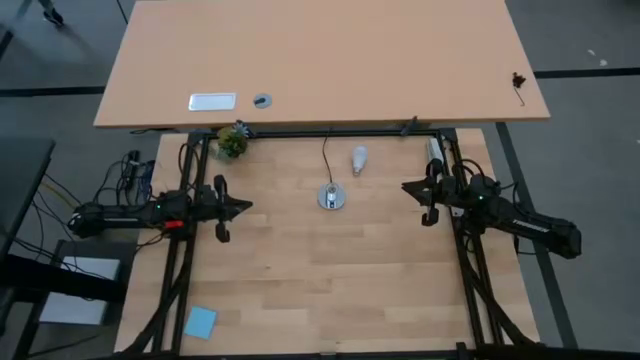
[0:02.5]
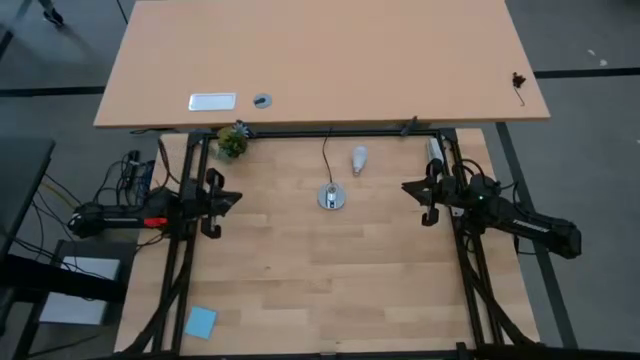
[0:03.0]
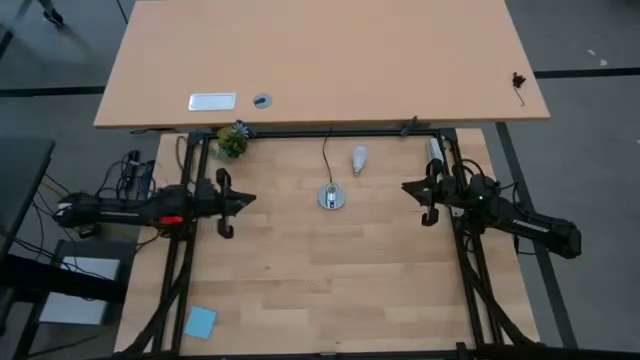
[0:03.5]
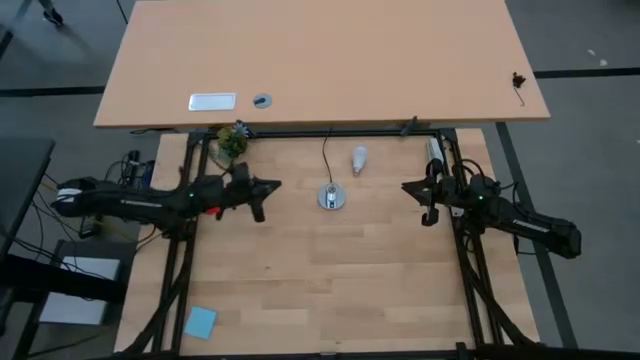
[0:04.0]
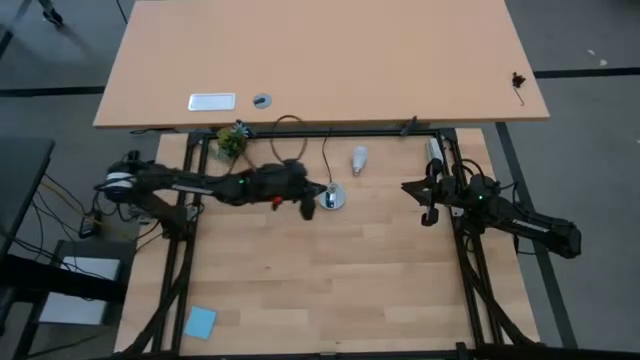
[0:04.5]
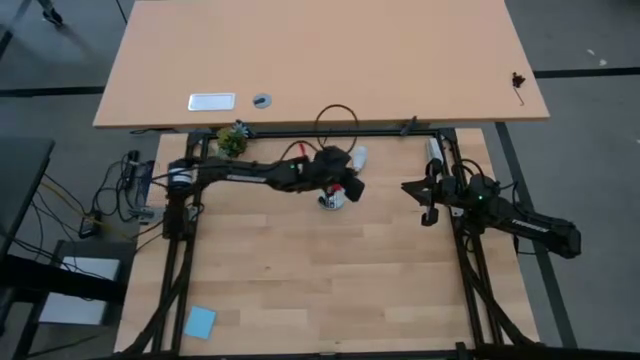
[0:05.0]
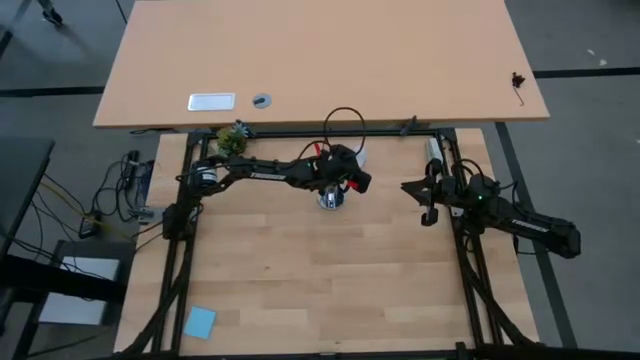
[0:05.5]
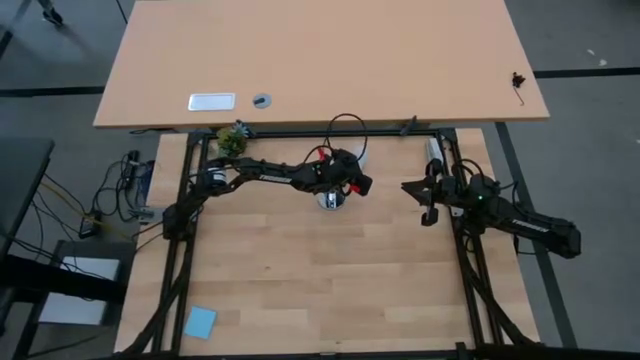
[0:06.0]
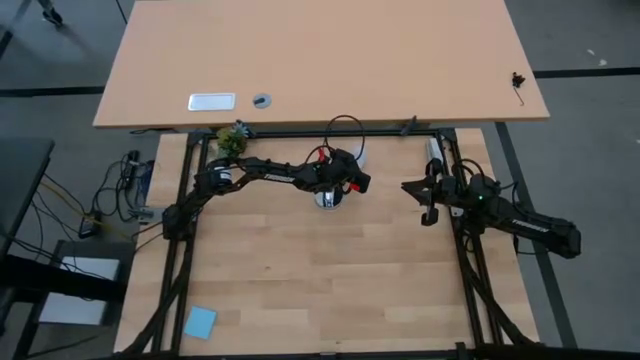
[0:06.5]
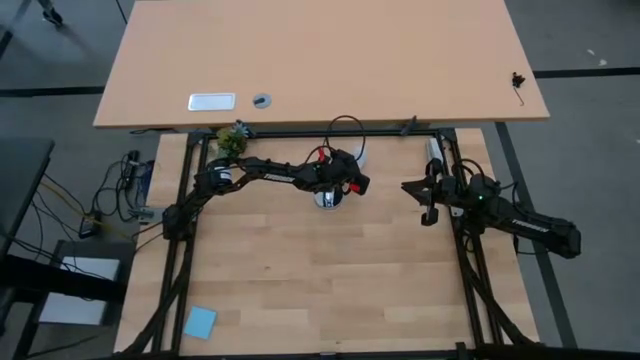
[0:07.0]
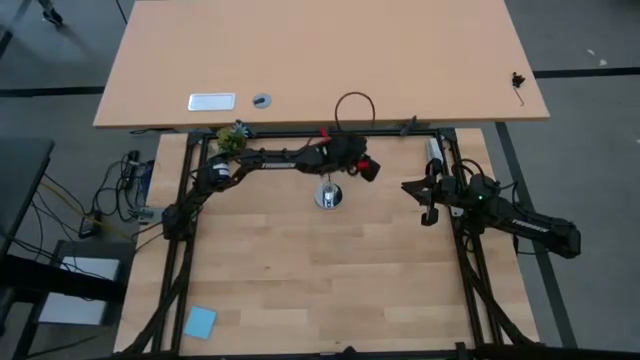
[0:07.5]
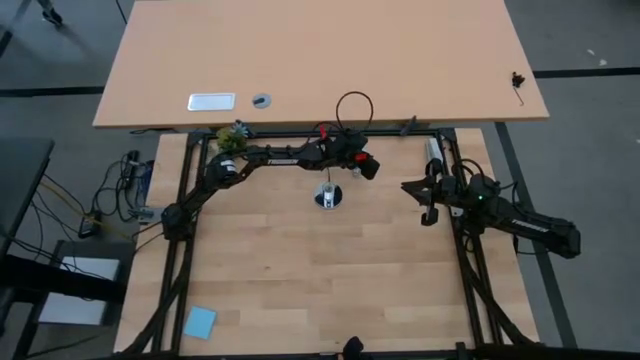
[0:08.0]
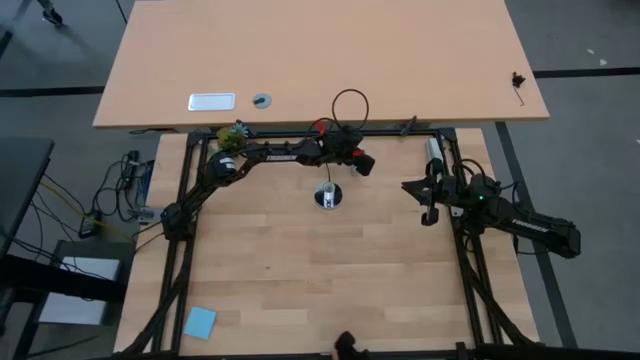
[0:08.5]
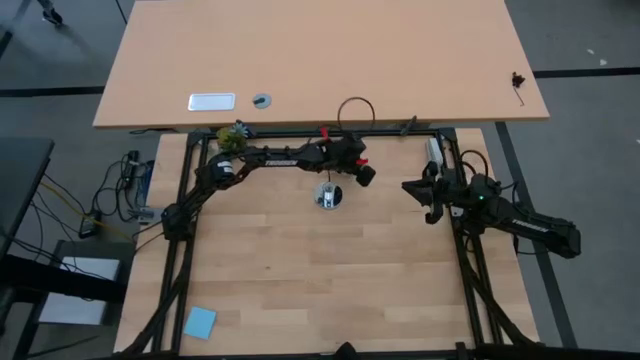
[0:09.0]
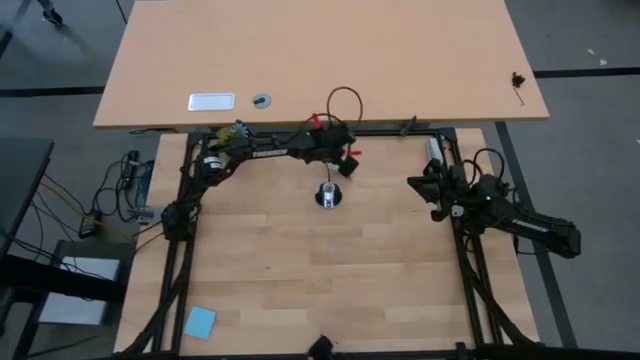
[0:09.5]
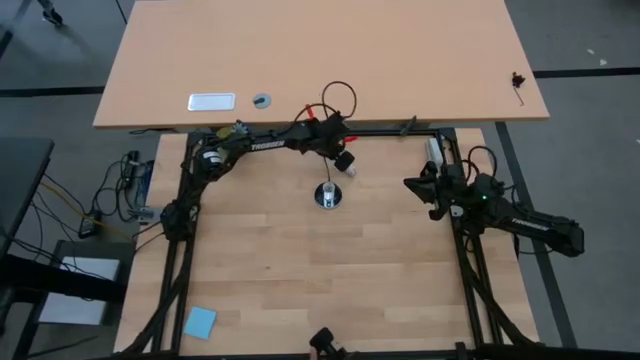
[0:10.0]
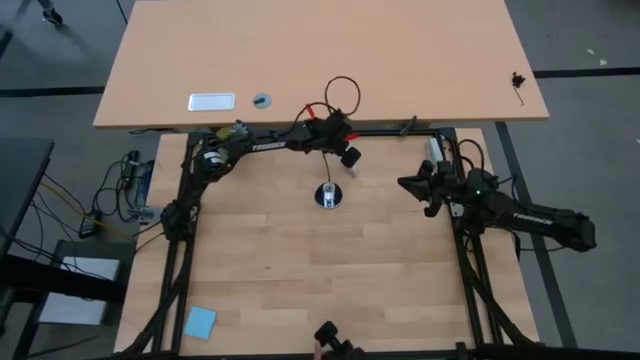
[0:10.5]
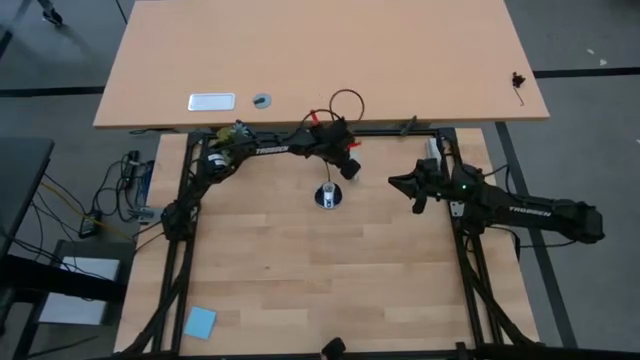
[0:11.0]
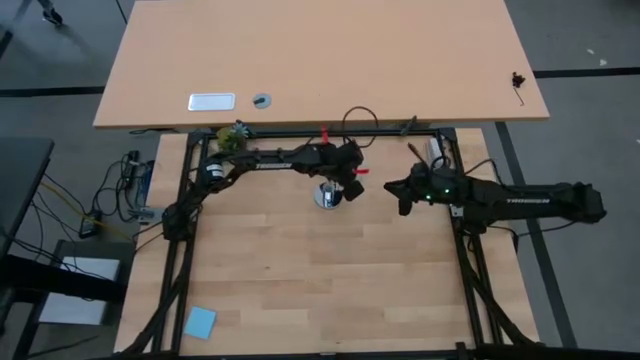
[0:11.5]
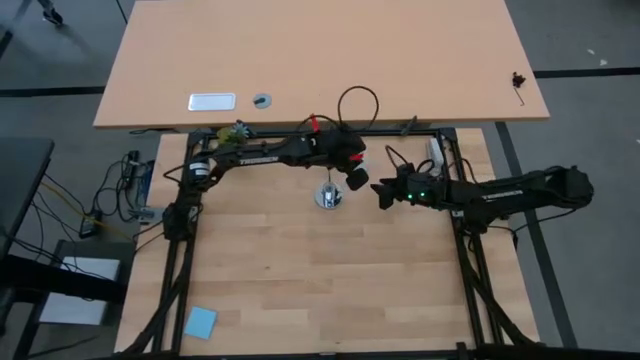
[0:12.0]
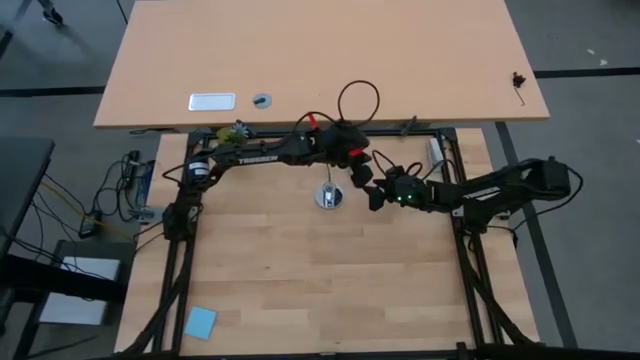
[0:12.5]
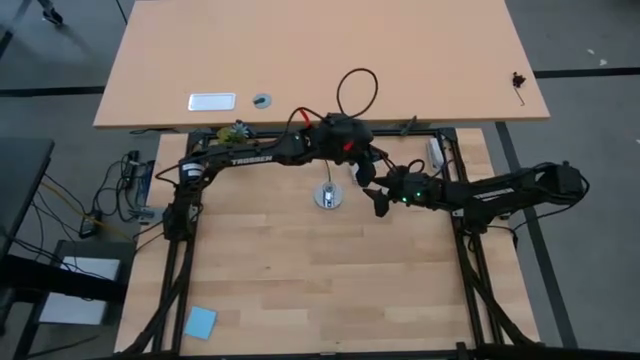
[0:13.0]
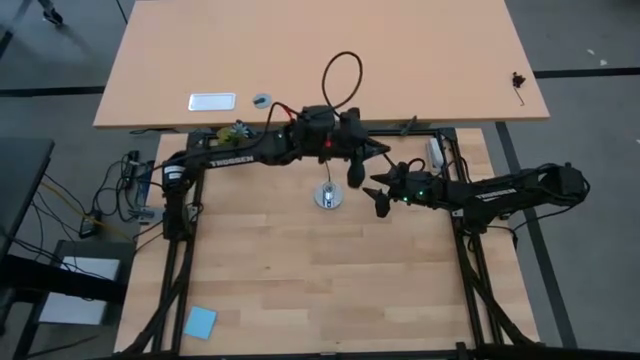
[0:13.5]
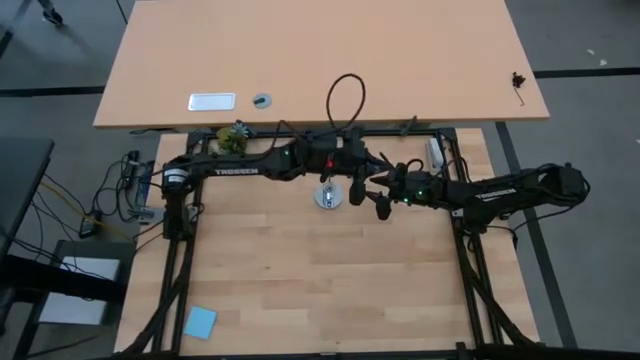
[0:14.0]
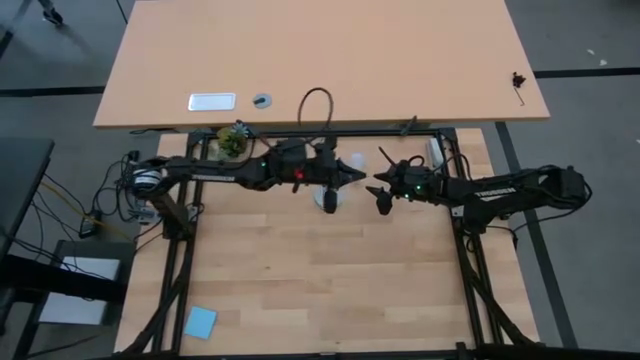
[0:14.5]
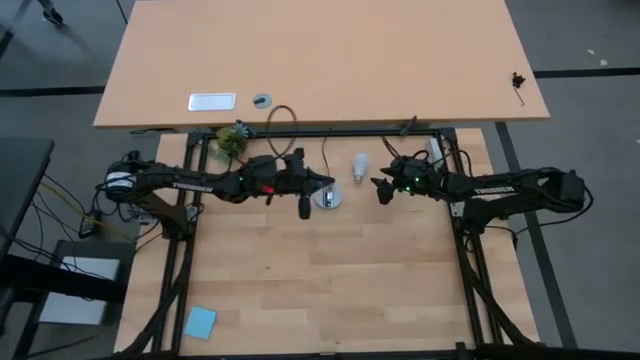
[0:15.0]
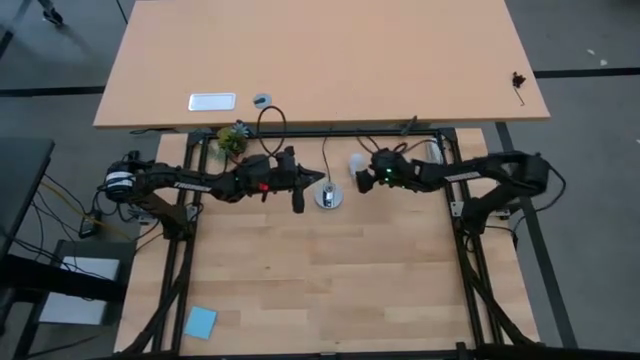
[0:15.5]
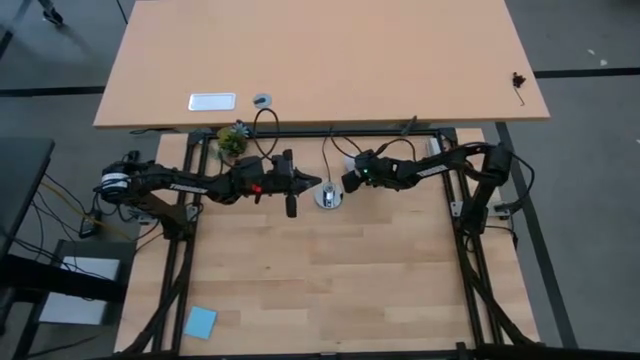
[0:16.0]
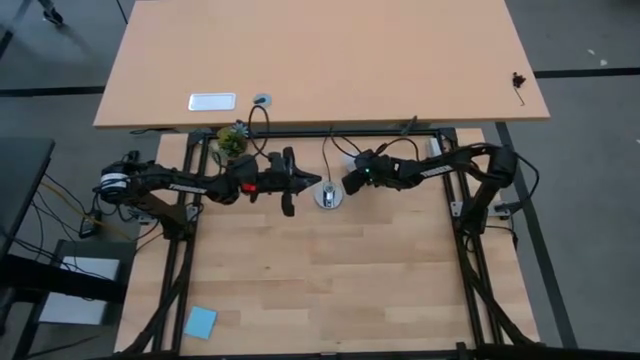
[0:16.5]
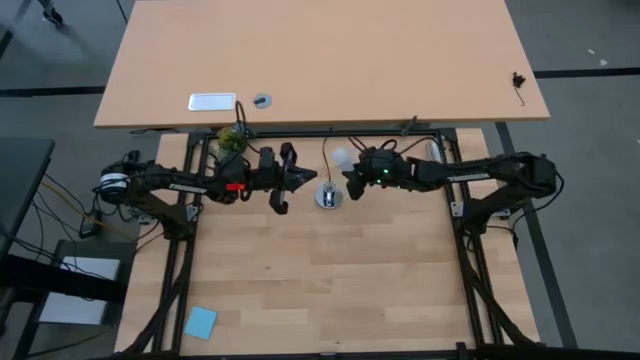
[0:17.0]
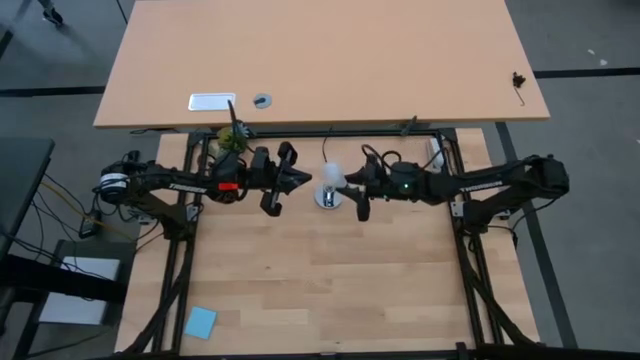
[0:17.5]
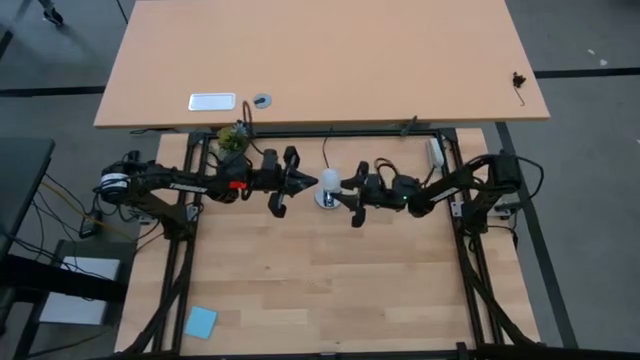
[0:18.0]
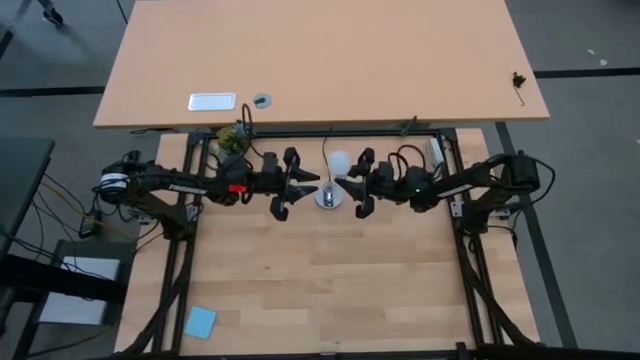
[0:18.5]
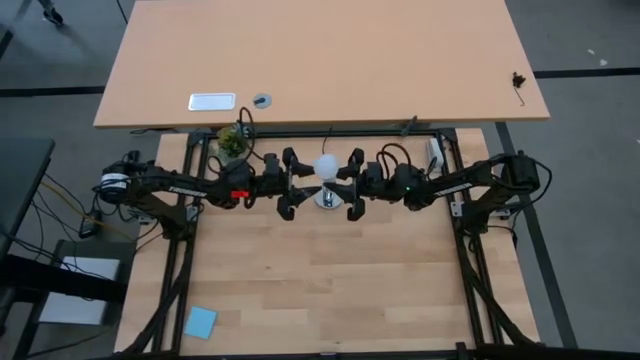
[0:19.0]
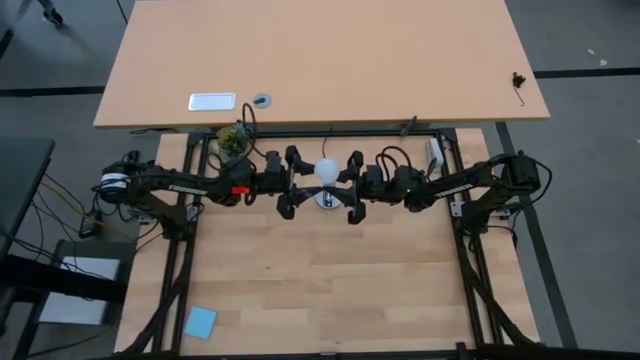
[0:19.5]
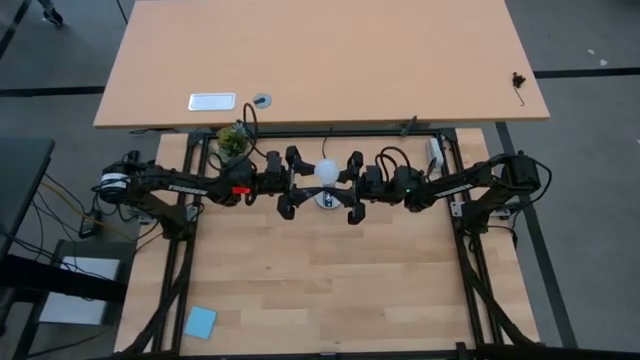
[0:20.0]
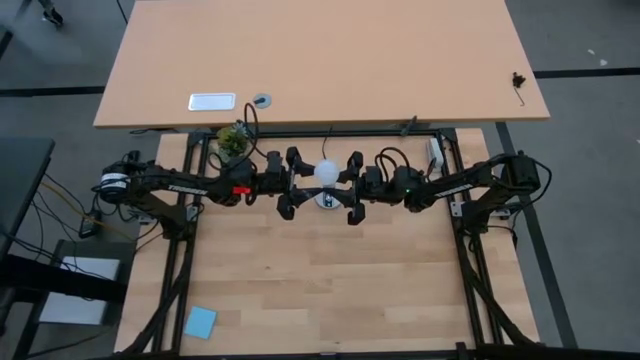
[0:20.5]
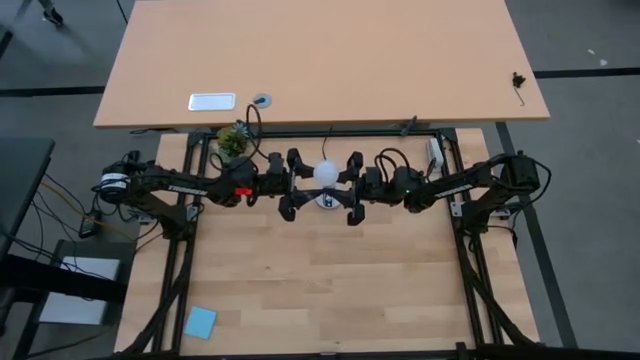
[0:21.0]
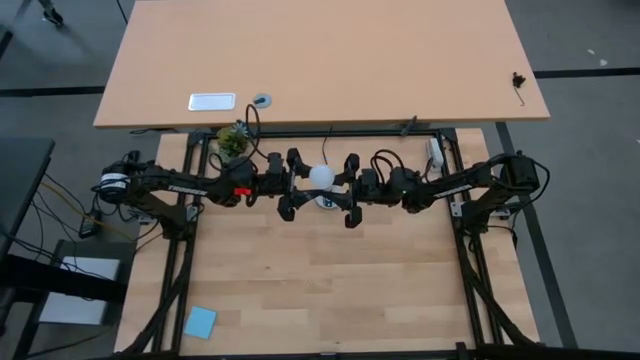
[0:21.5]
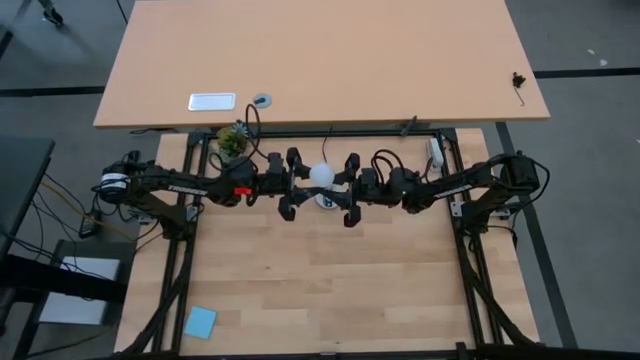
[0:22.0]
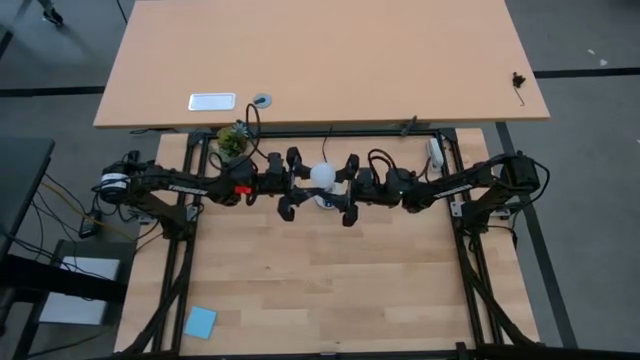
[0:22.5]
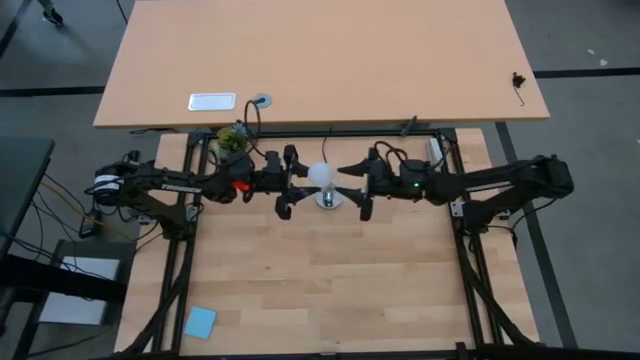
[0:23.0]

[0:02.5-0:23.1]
Task: Screw lightbulb
Insert the lightbulb into the lamp
